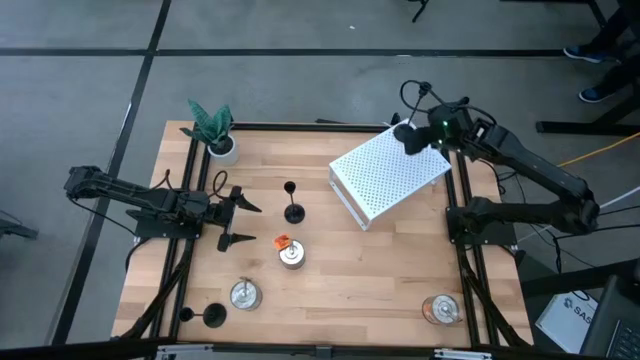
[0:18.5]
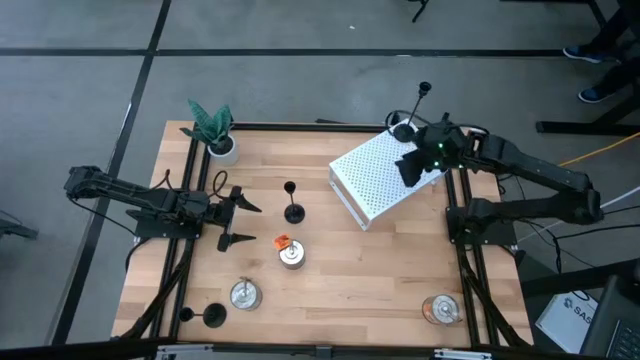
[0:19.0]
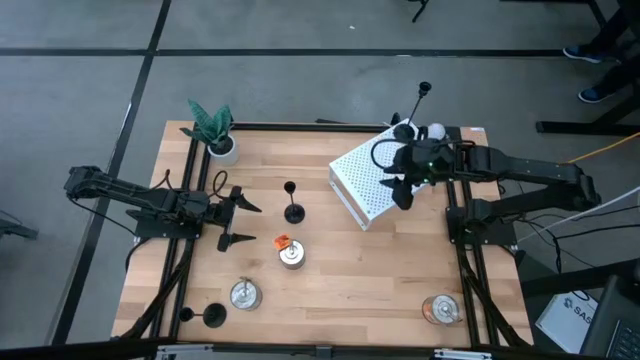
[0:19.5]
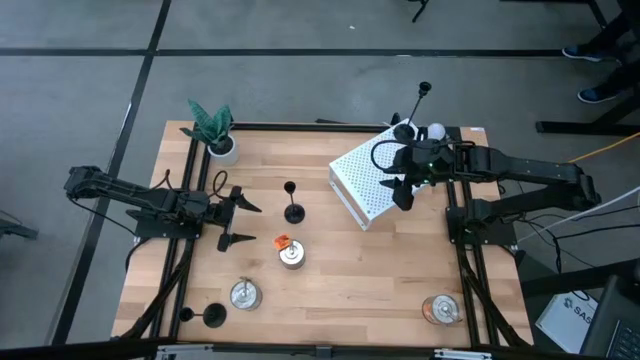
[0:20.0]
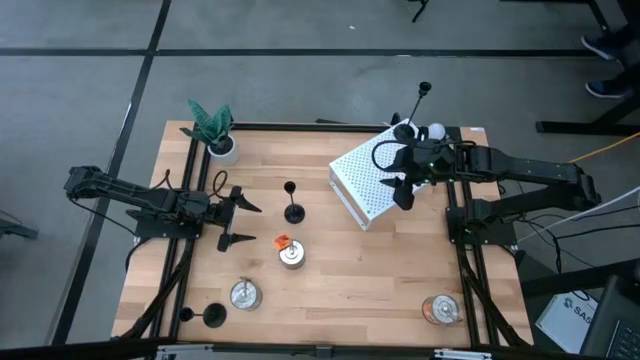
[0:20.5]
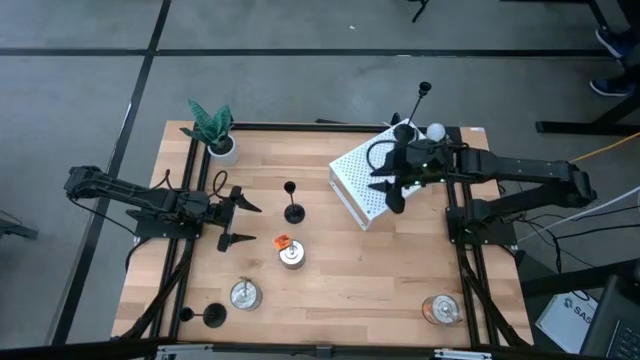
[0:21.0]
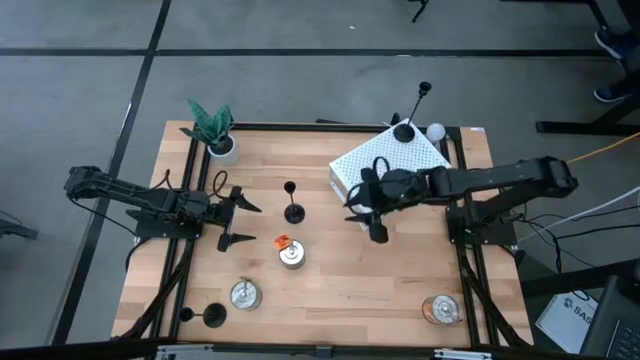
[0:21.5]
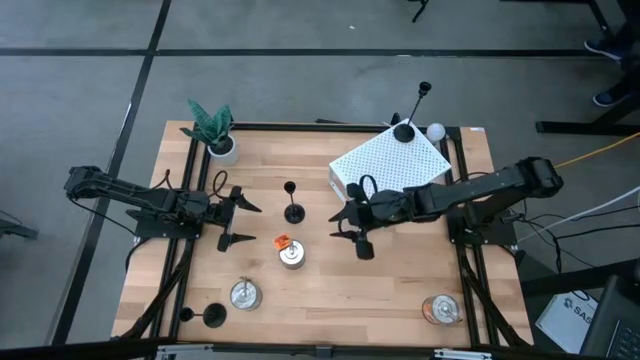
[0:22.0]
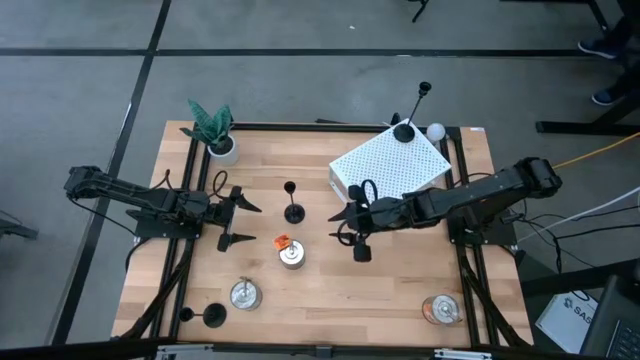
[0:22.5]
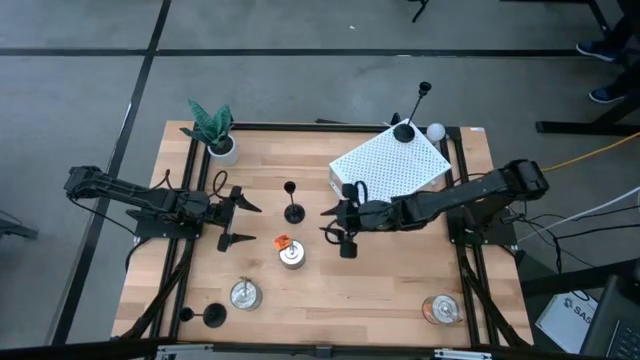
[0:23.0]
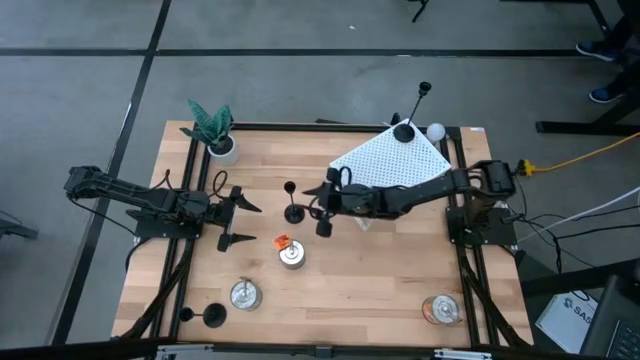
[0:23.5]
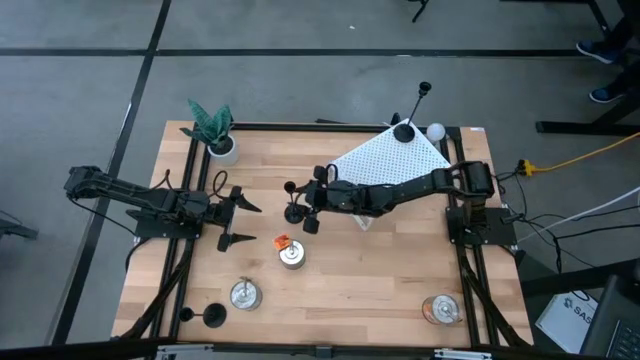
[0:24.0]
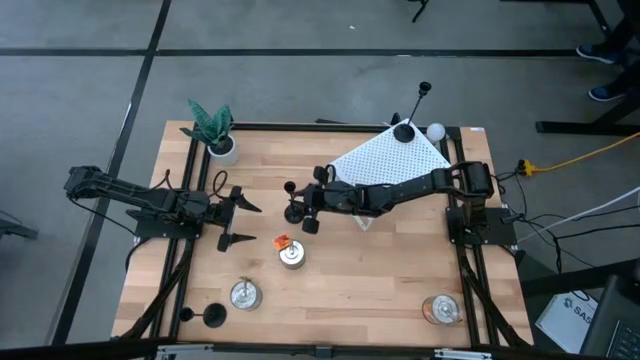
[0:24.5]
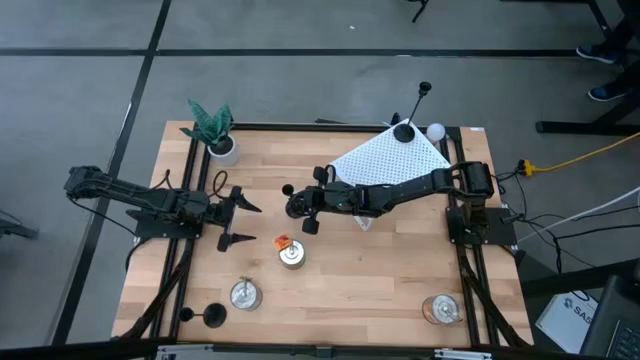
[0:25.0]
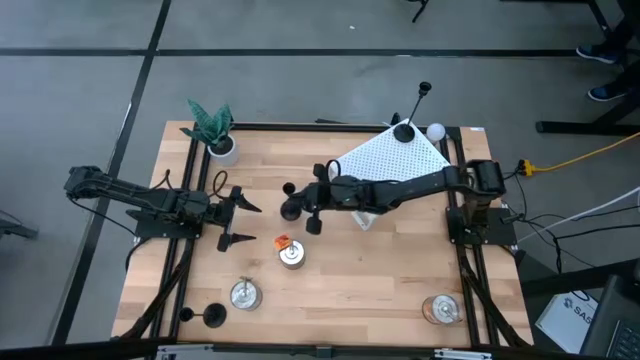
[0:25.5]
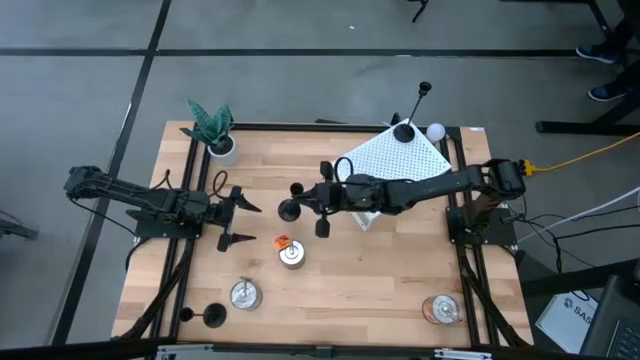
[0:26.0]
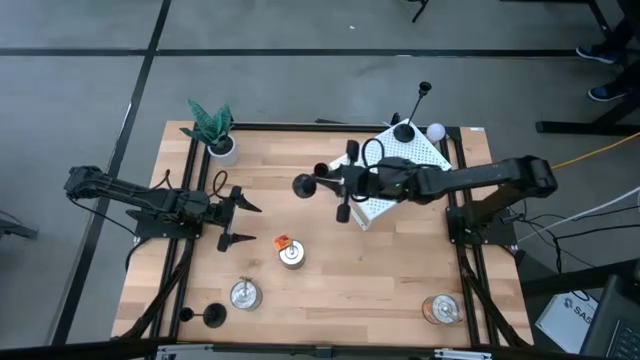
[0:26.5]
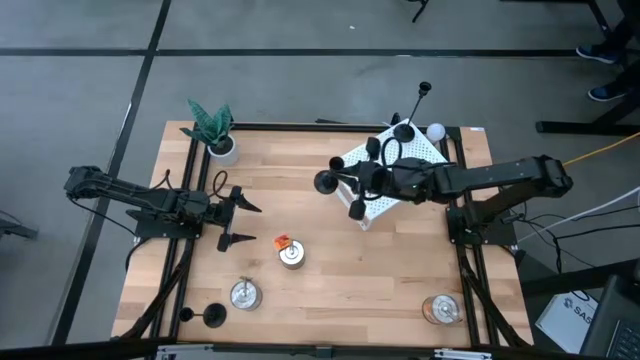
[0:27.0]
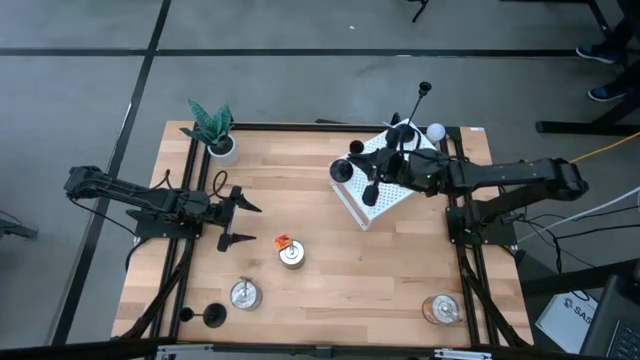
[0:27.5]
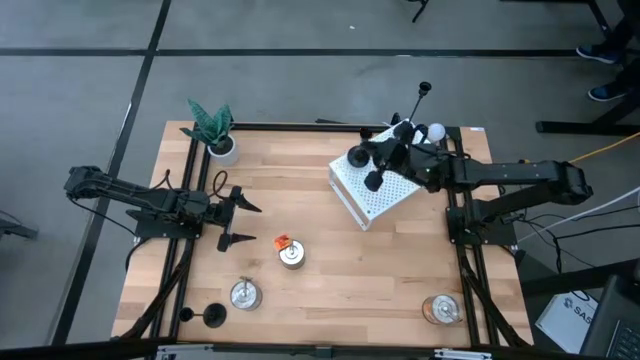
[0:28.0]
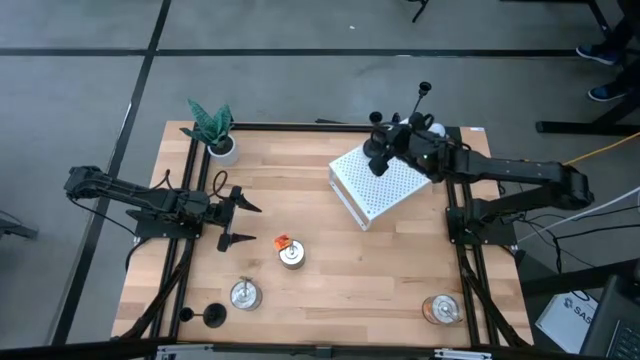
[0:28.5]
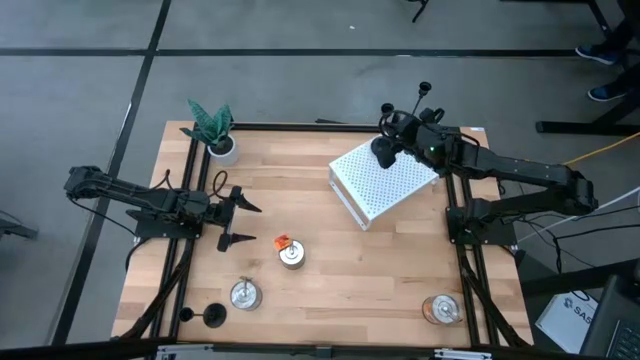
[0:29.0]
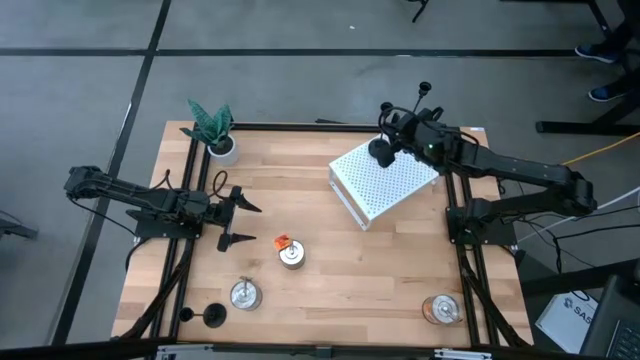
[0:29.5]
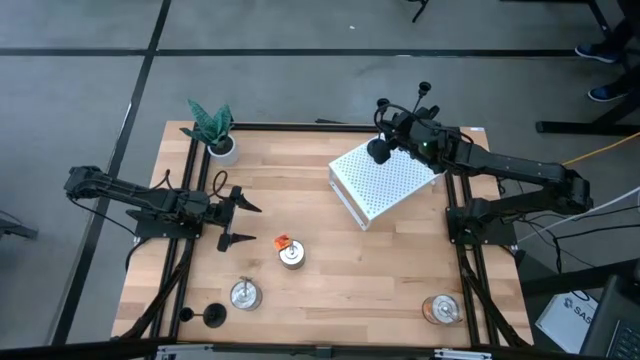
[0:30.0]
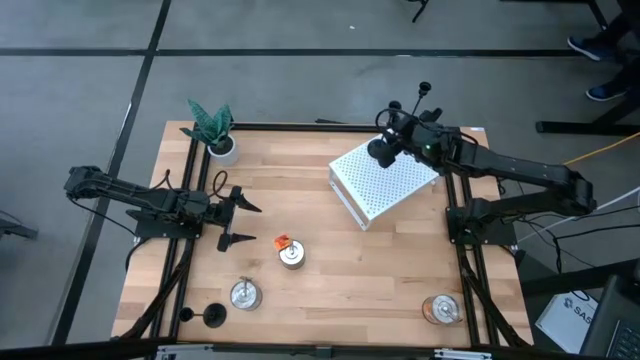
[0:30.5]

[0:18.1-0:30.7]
Task: Pick & Place candle stick holders
Put the top black candle holder on the shelf aligned with the other black candle holder

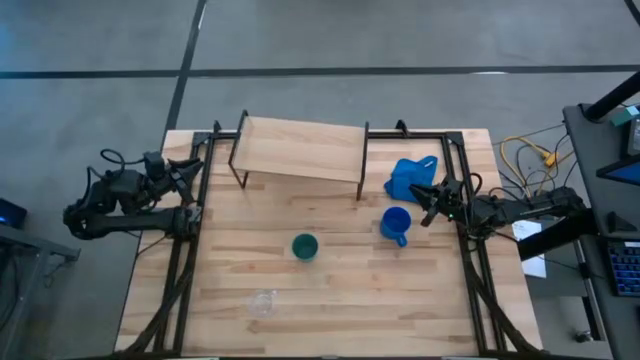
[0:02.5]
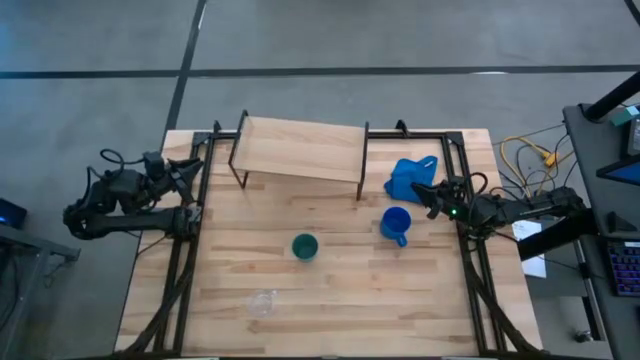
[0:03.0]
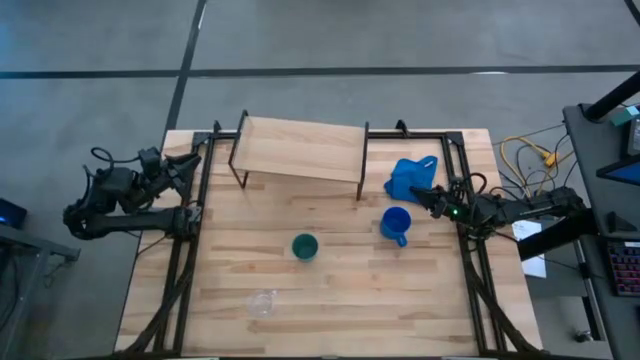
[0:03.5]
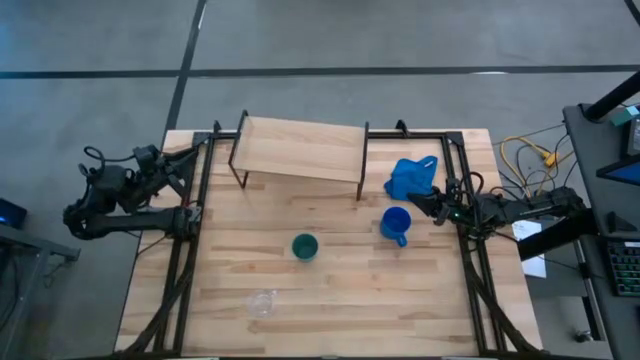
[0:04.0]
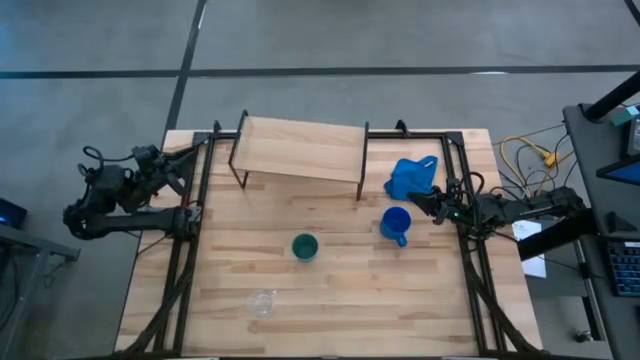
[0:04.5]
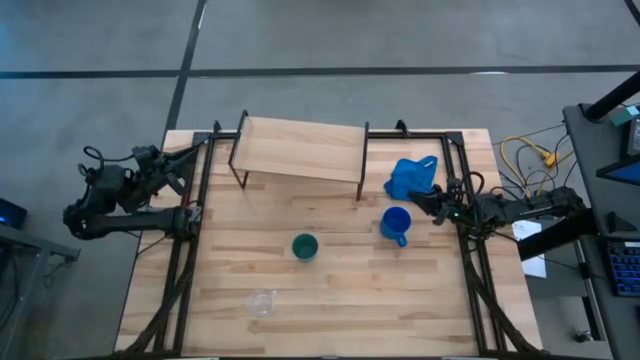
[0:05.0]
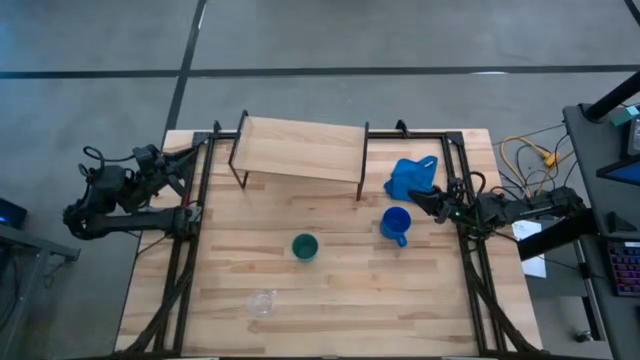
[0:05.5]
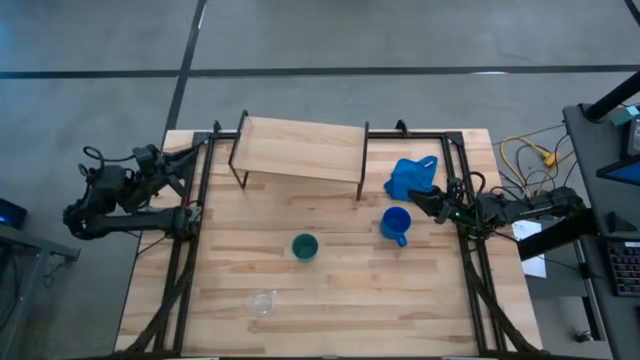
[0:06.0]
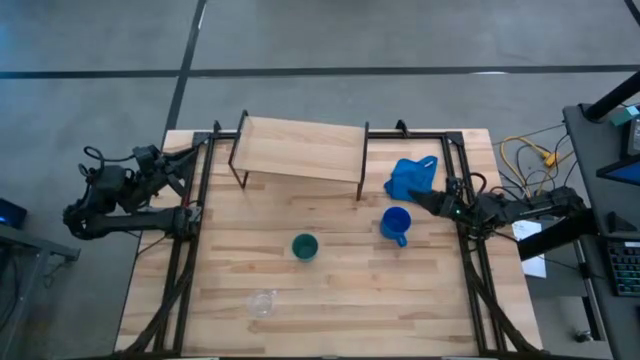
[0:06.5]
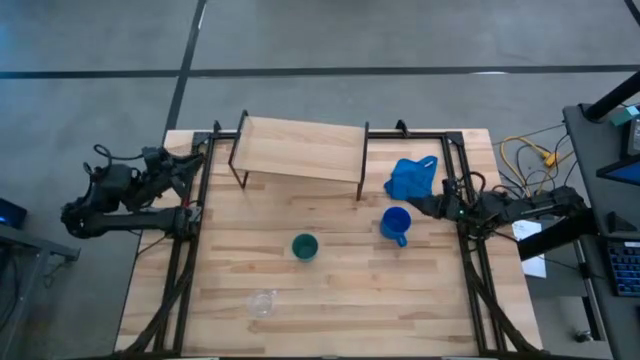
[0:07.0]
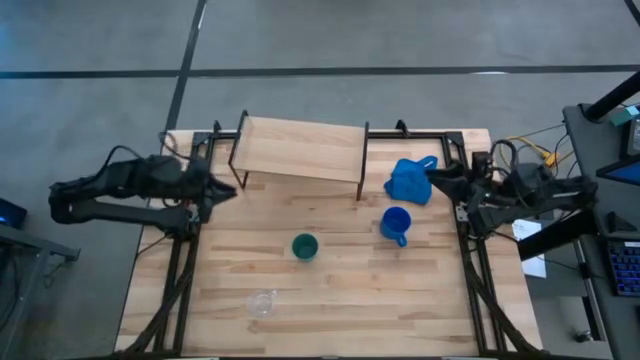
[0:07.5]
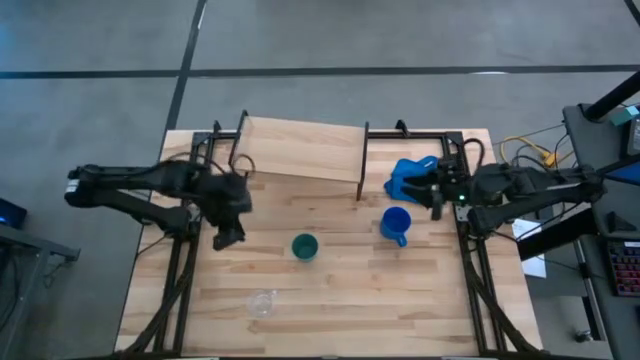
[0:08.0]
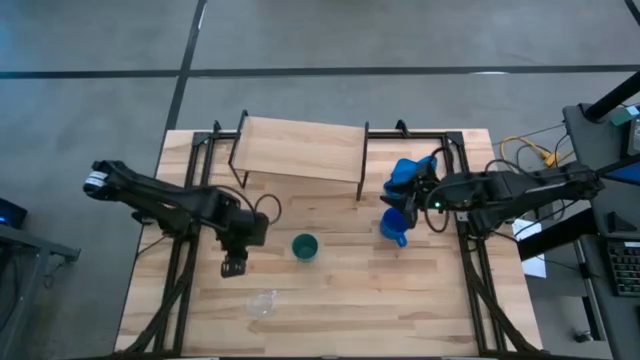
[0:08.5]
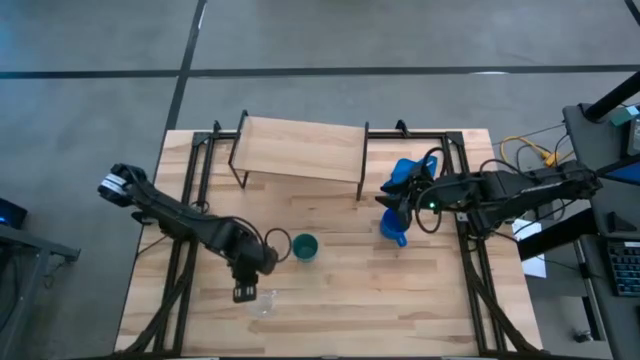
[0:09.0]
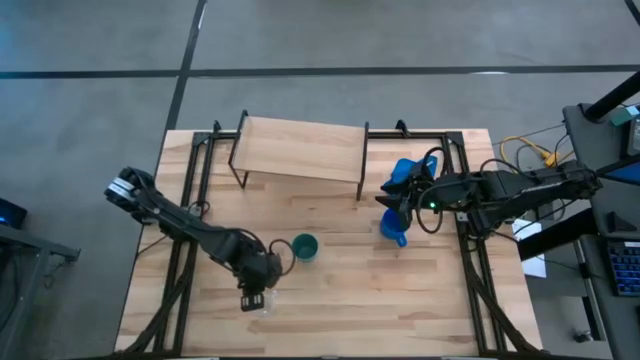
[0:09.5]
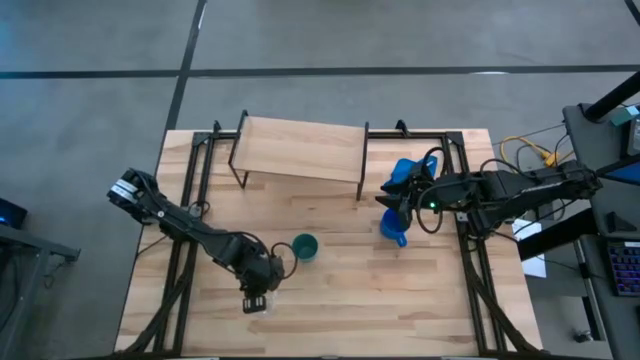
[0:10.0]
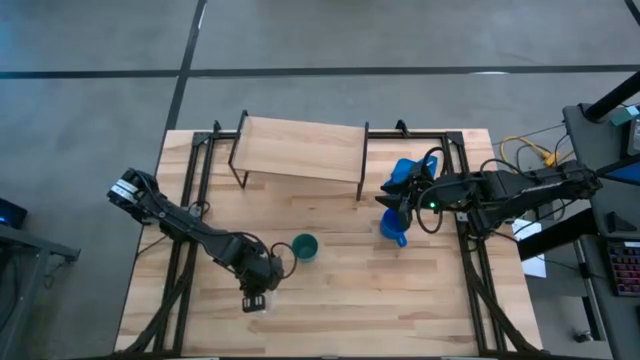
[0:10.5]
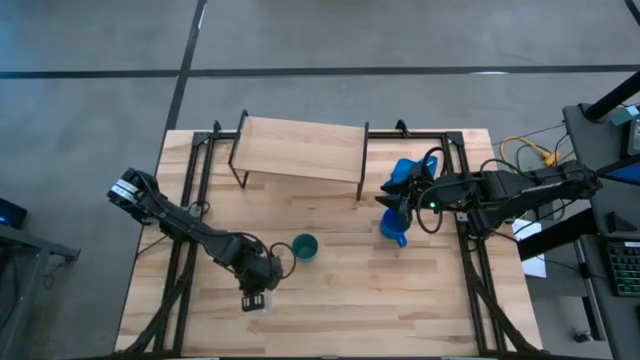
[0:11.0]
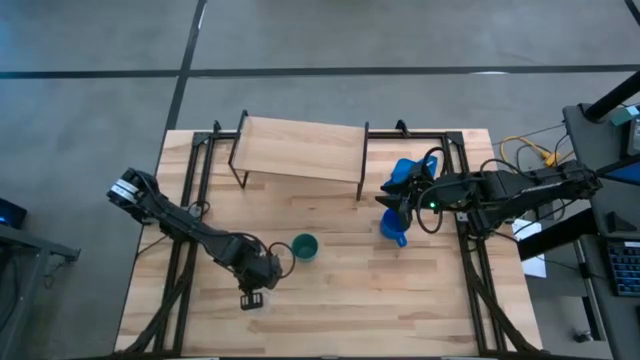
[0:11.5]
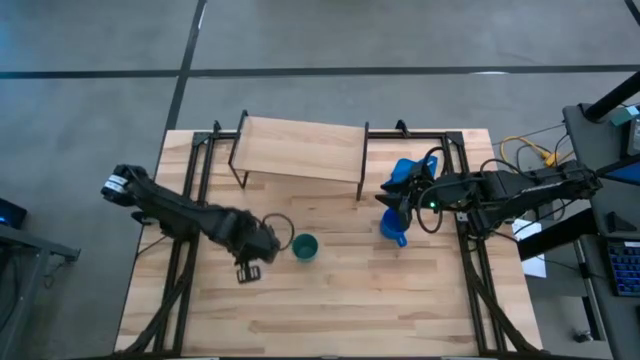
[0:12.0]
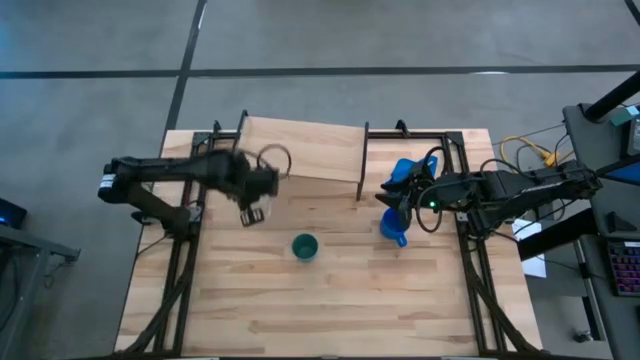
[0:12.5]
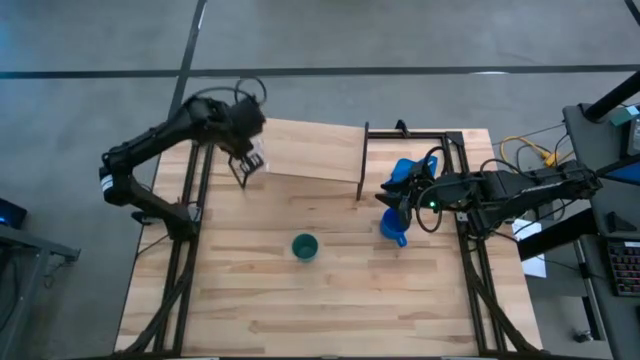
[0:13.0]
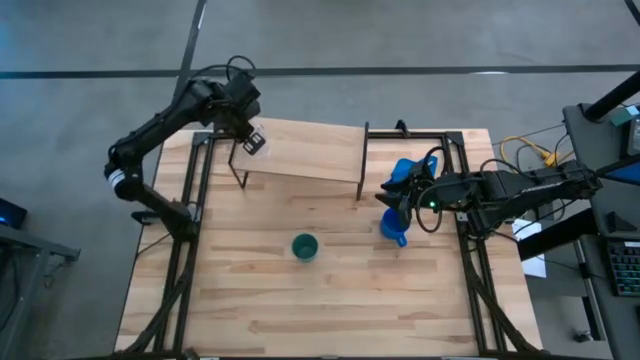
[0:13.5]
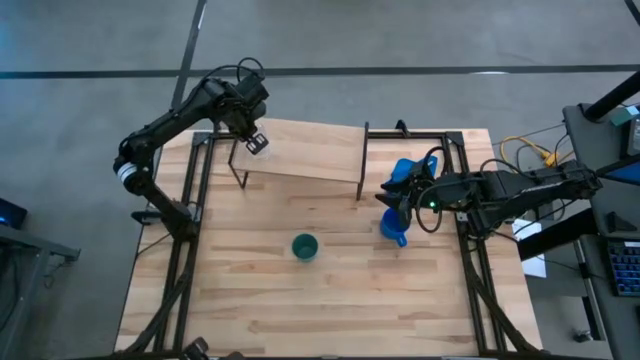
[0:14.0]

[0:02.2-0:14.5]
Task: Stack small to large cups/mugs on shelf
Put the transparent cup on the shelf
